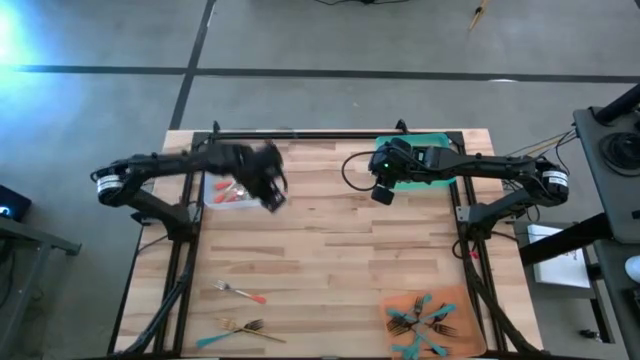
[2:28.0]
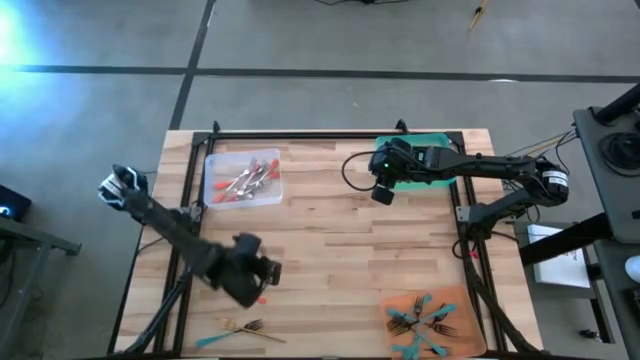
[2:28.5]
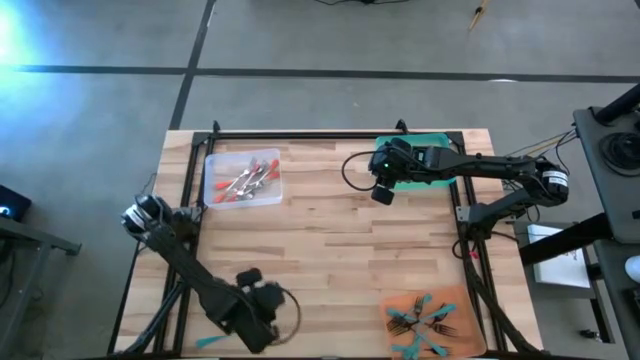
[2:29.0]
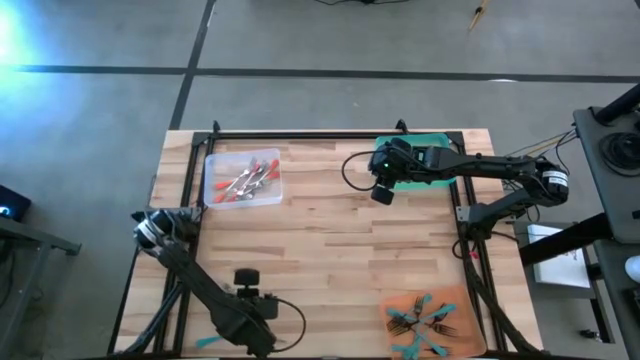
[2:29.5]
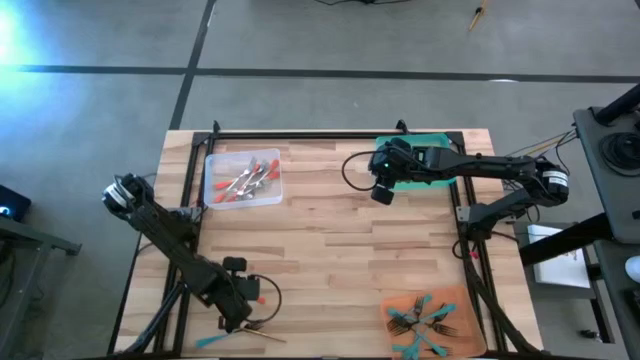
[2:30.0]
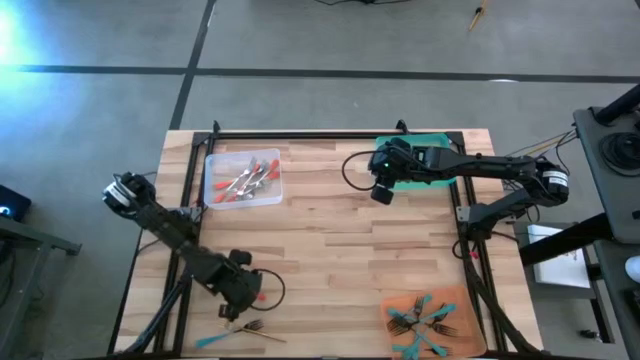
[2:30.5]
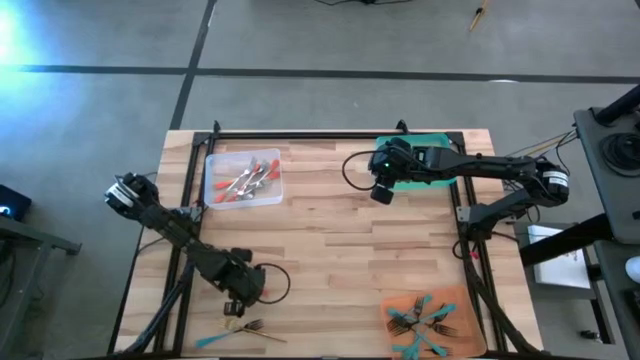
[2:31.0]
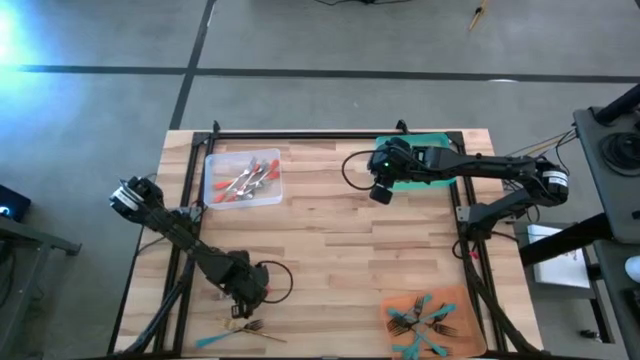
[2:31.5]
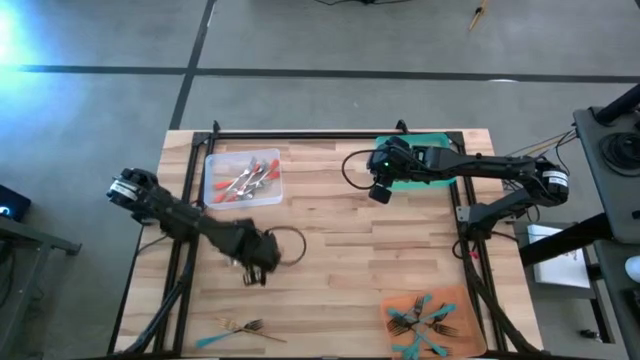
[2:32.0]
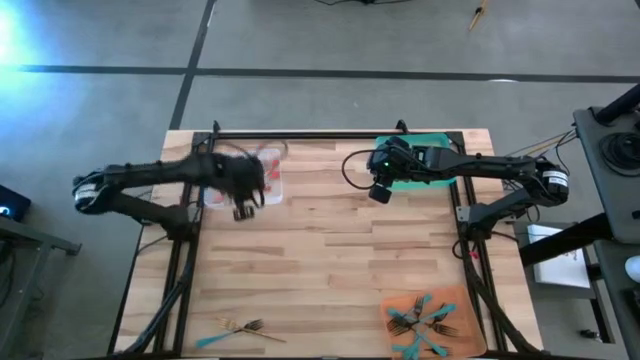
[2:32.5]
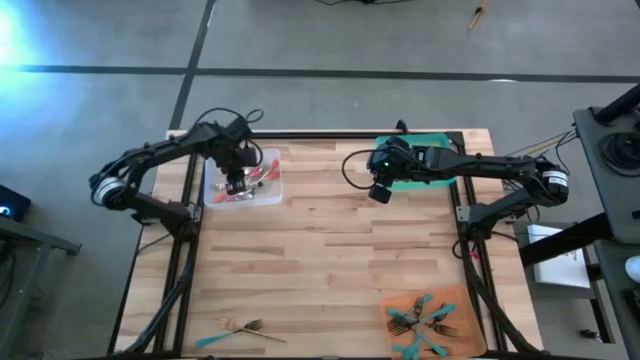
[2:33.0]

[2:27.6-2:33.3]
Task: Sort silverware by color (type)
Put the orange fork into the white bin

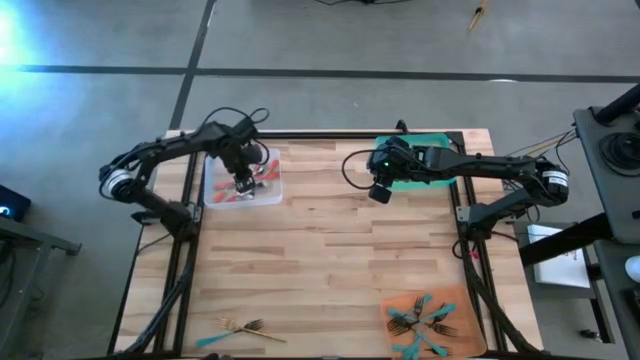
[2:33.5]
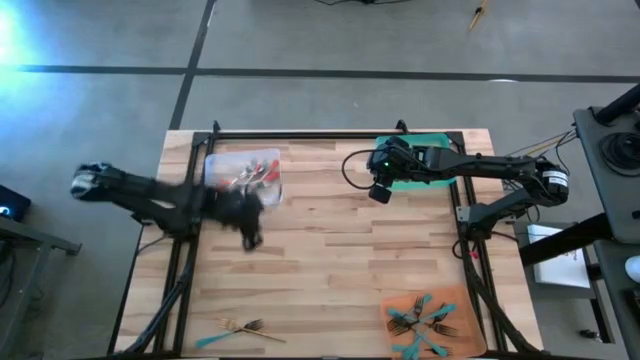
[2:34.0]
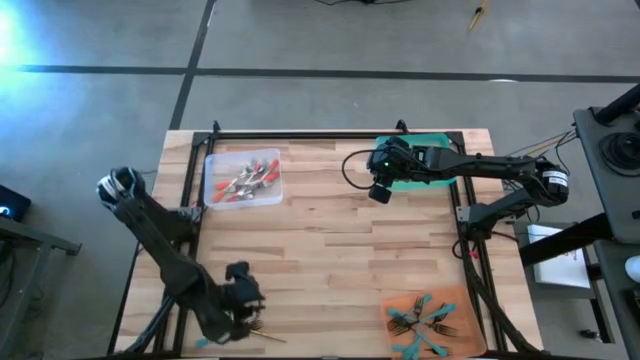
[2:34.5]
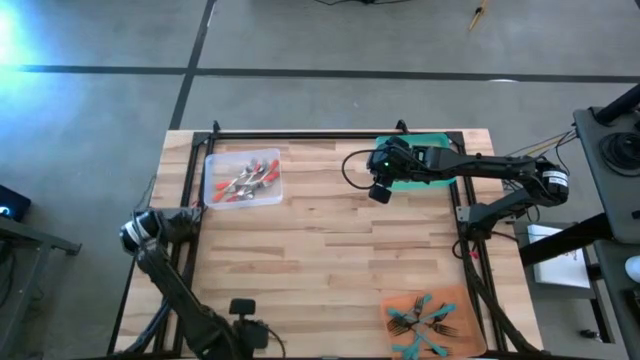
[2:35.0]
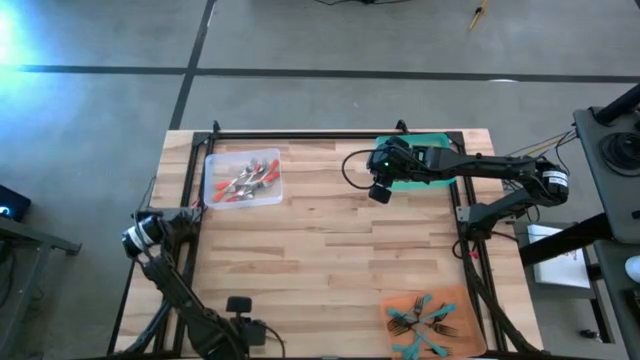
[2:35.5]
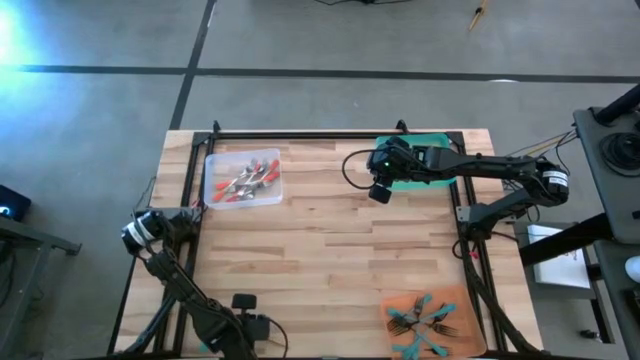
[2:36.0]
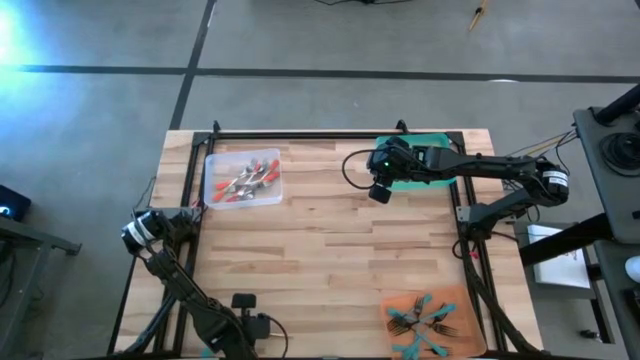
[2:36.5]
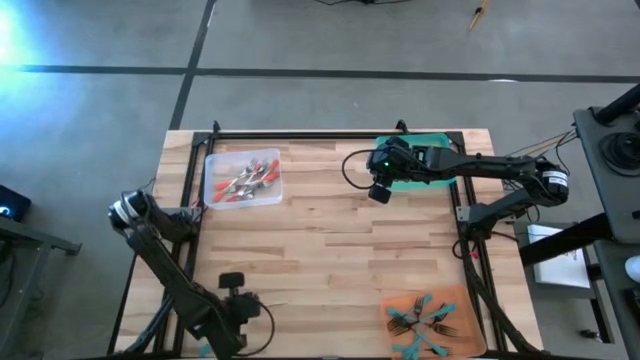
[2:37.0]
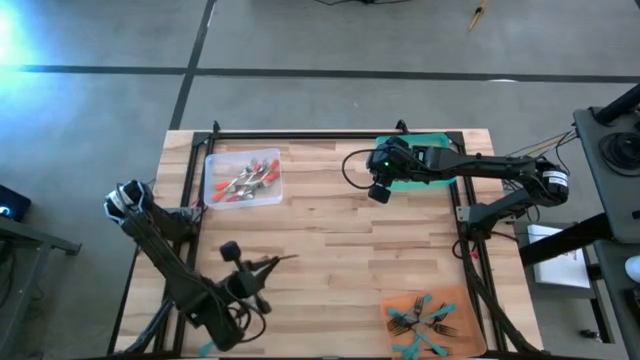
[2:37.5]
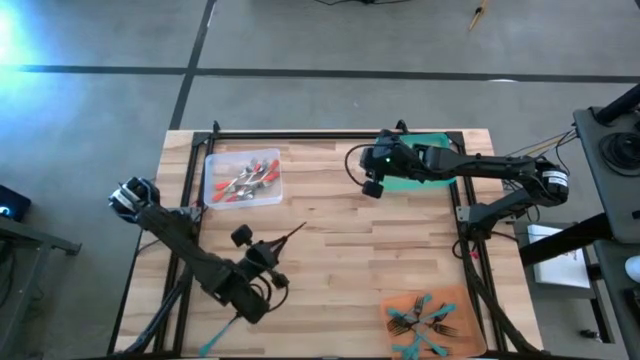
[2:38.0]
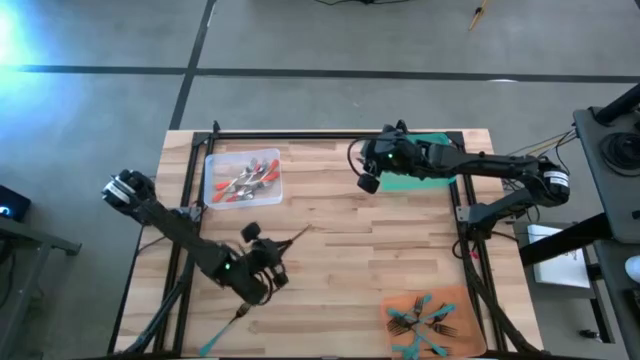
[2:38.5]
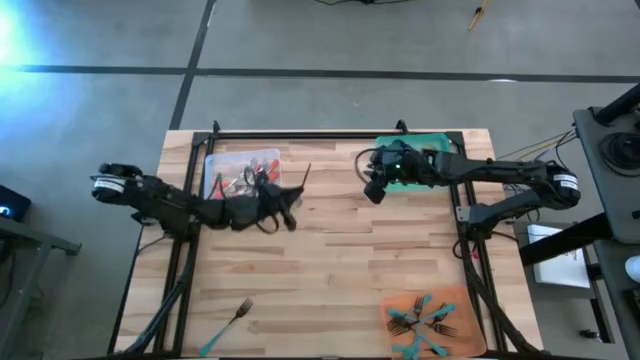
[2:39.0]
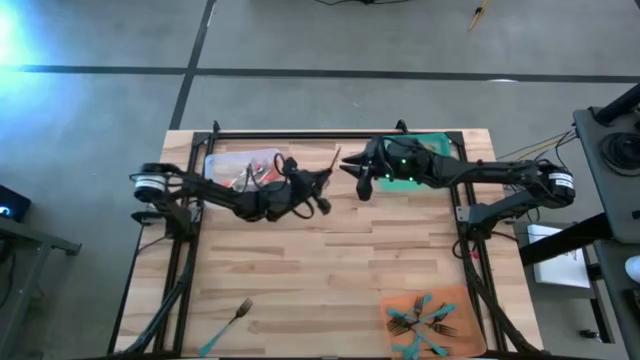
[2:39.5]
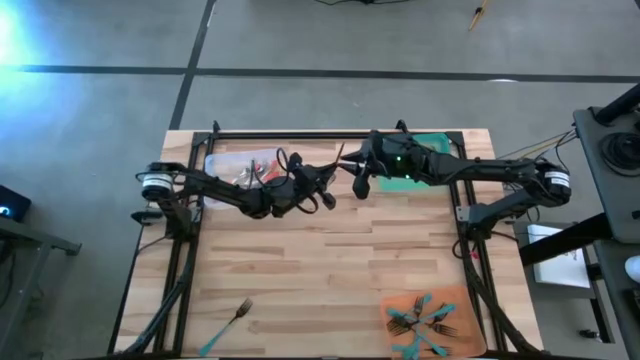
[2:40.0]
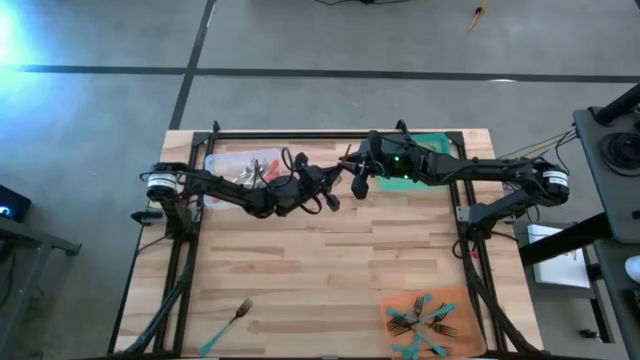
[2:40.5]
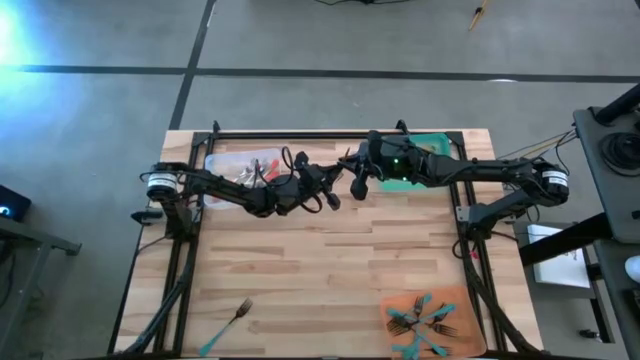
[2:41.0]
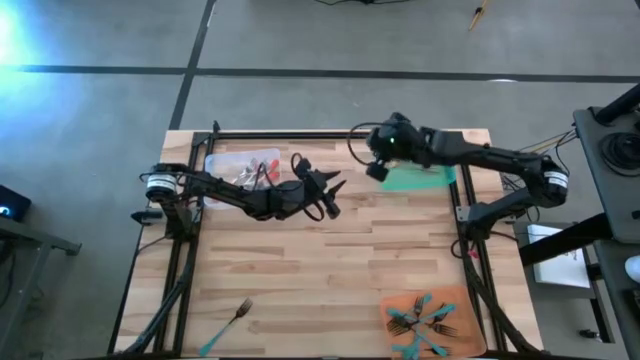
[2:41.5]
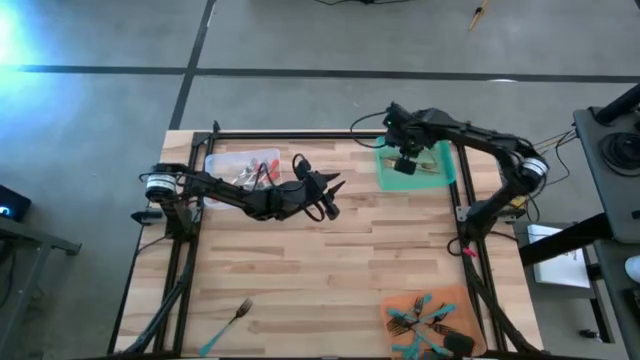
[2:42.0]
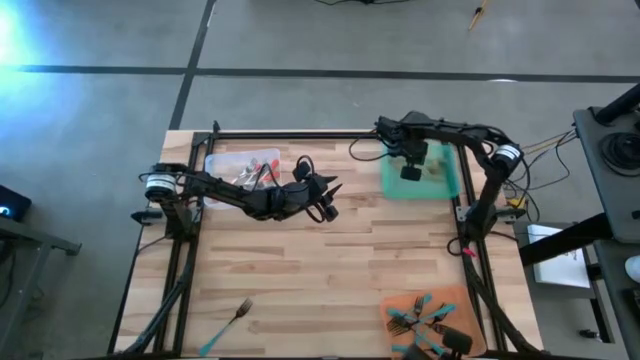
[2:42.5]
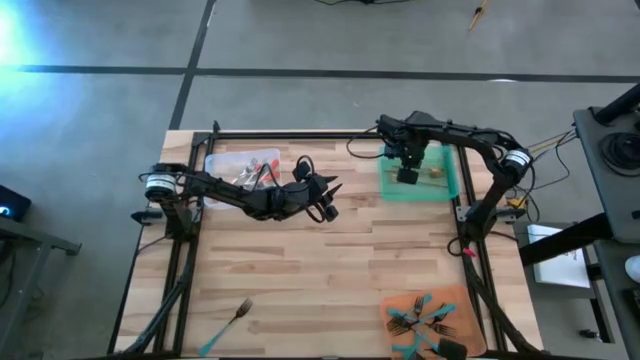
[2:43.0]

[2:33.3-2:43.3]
Put the golden fork into the green bin

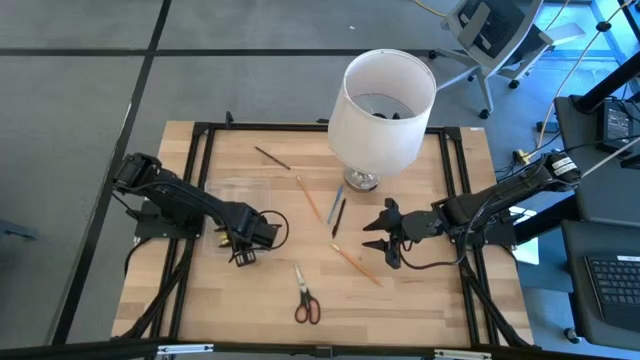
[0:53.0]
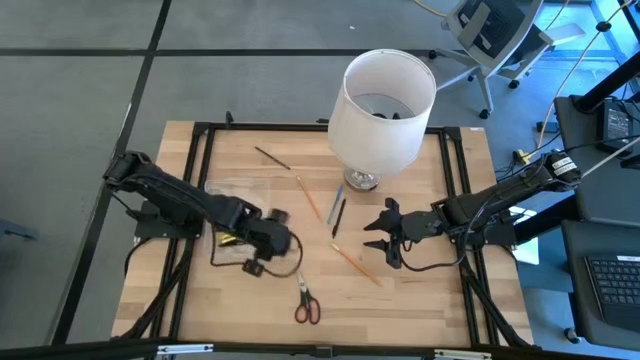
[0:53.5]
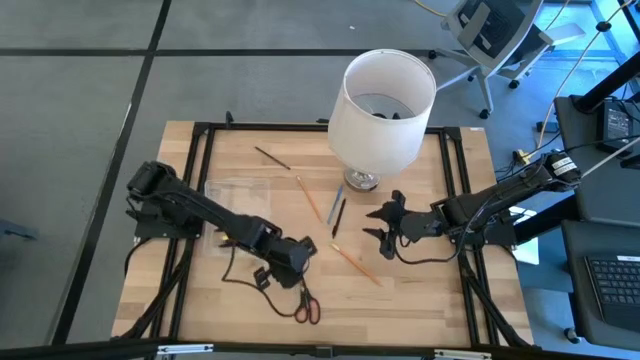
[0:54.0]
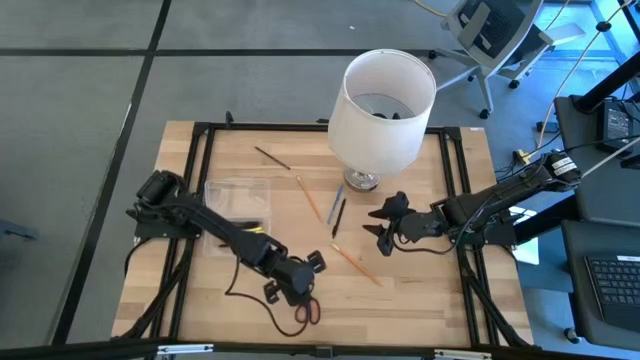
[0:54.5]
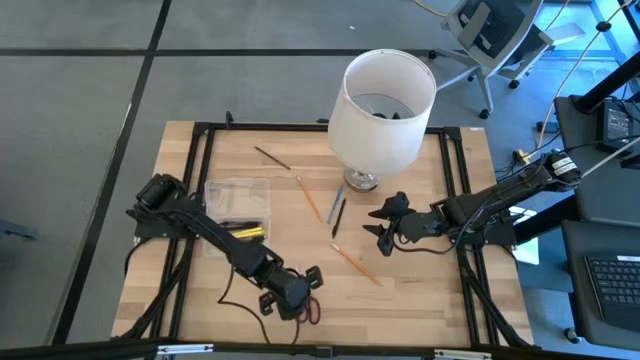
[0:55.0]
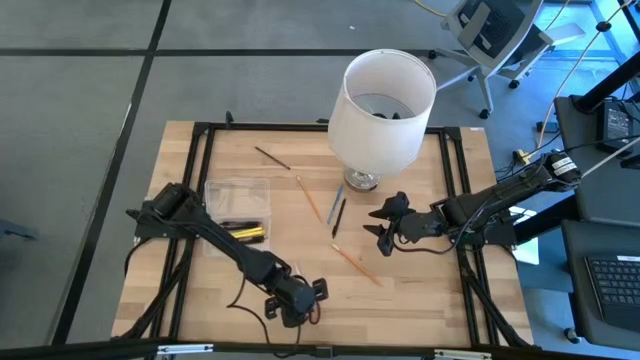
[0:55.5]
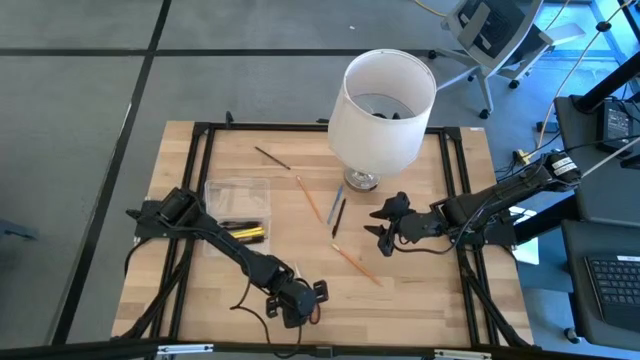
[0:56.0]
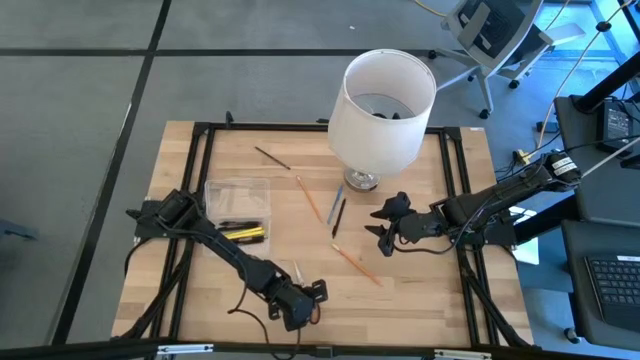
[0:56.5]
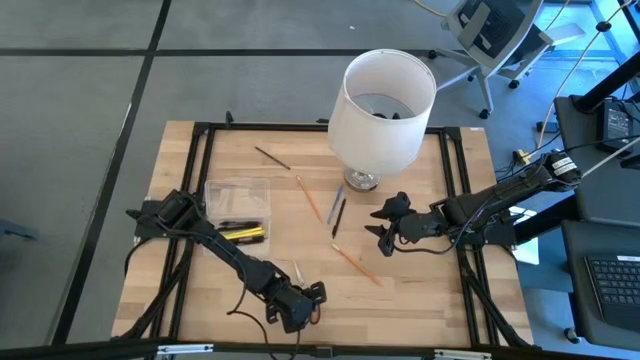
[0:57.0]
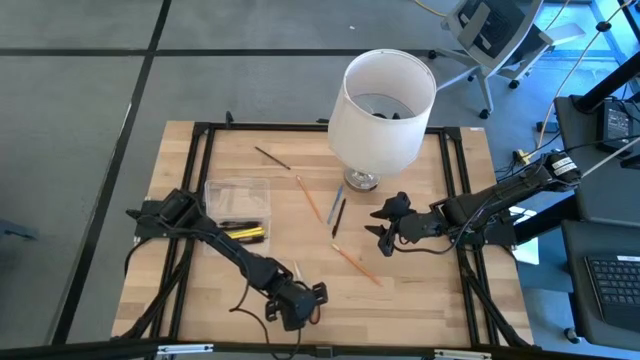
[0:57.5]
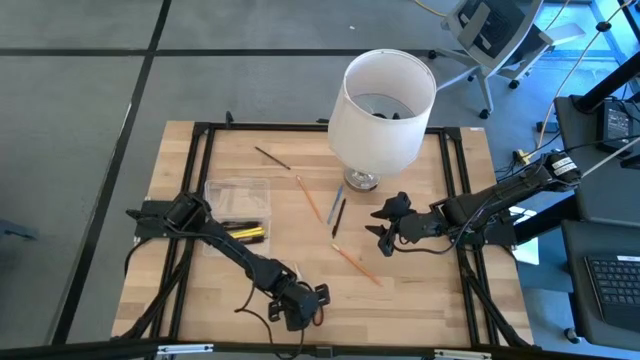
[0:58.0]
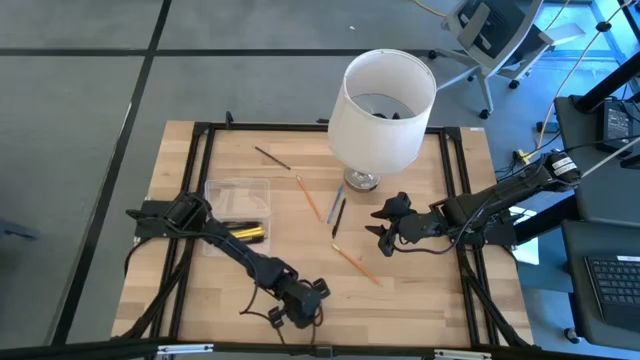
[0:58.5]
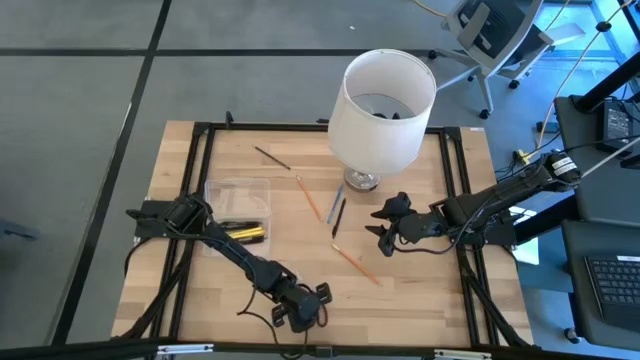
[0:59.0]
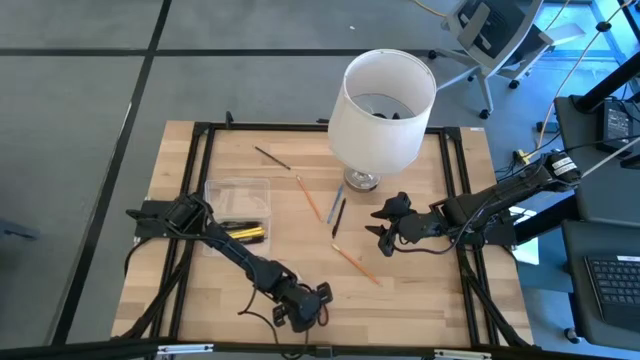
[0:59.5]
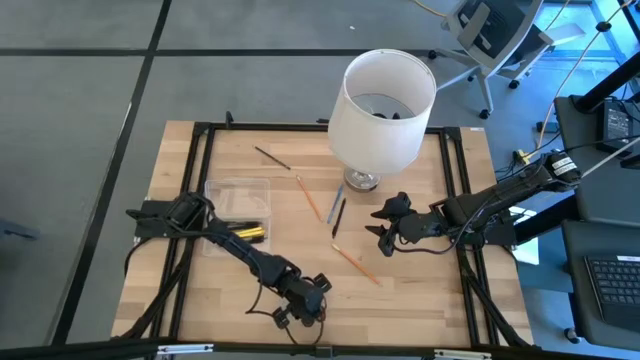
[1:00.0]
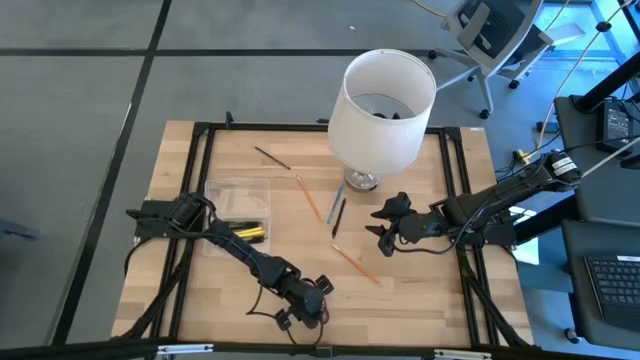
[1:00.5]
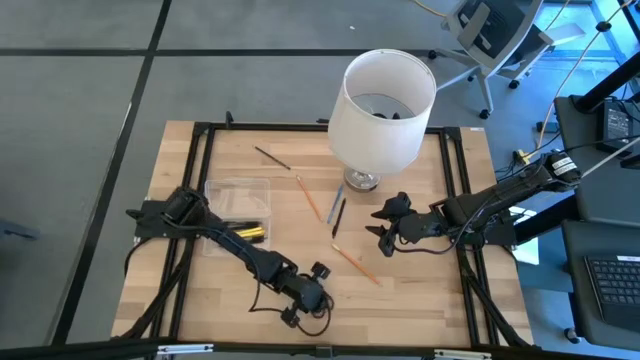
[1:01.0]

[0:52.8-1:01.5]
Task: Pick & place school supplies into a supply box
Put the black scissors into the transparent supply box
